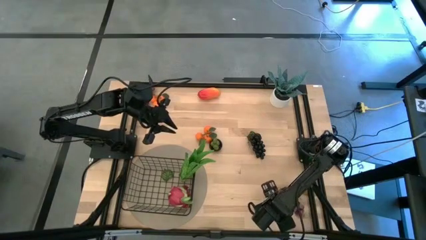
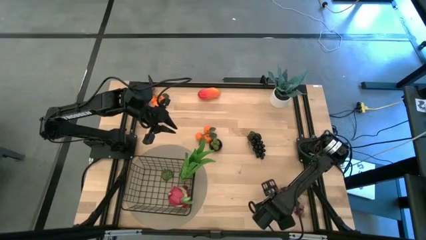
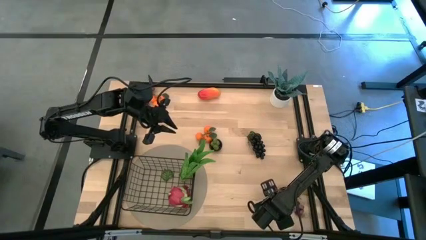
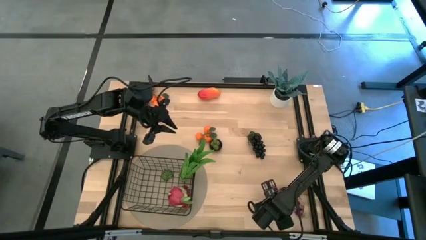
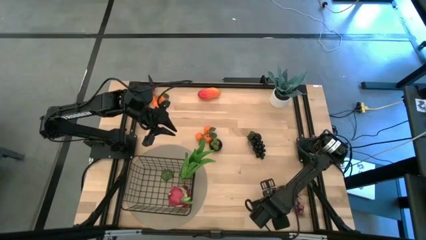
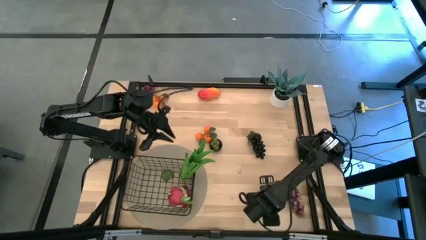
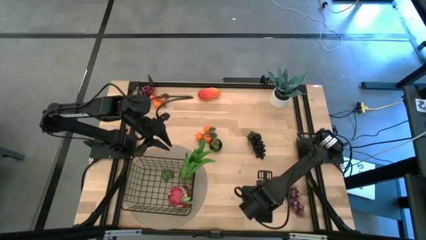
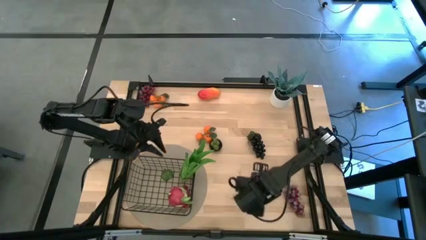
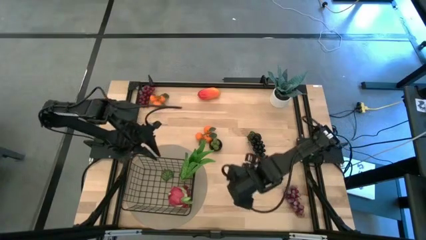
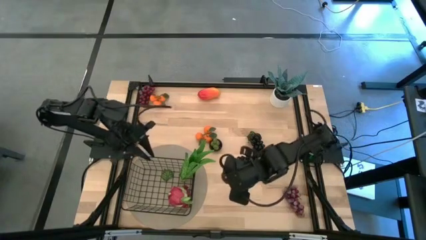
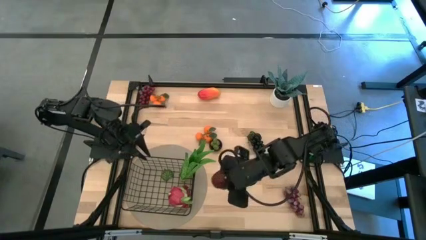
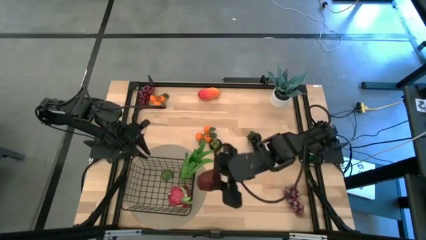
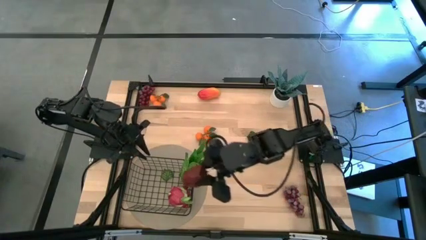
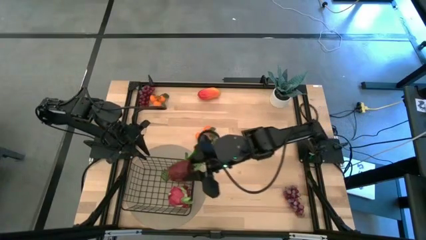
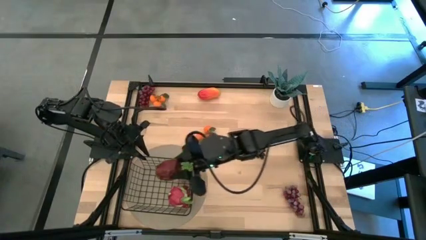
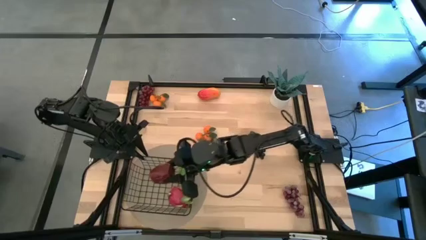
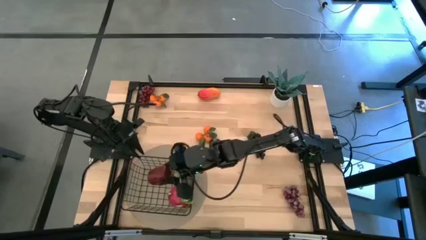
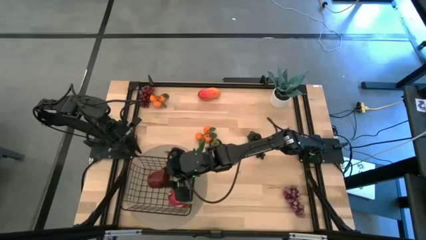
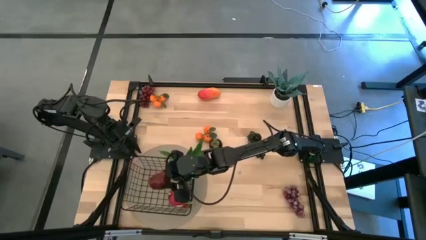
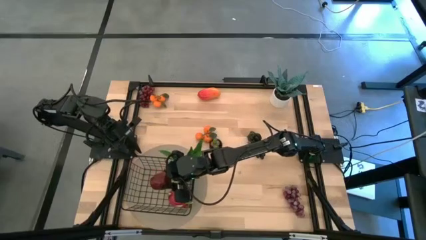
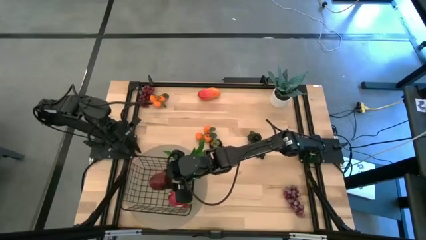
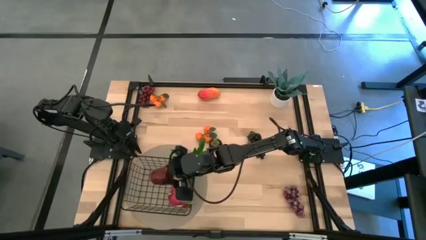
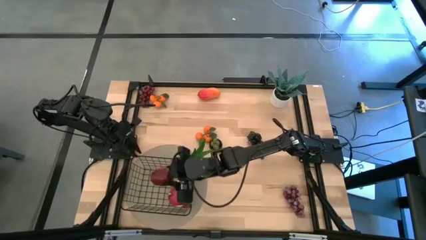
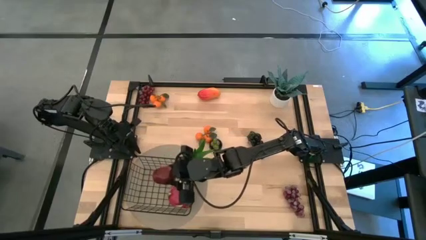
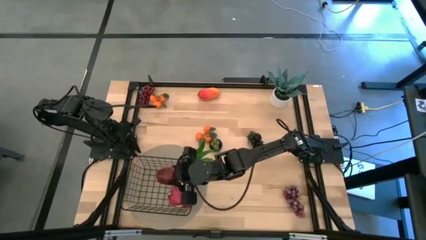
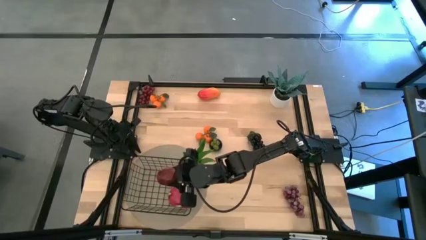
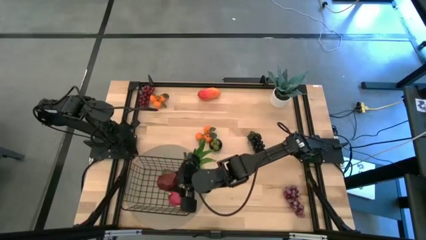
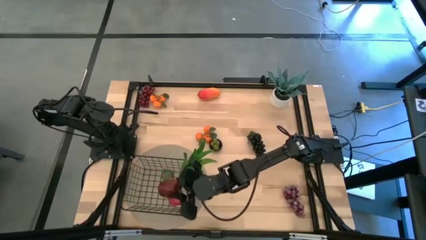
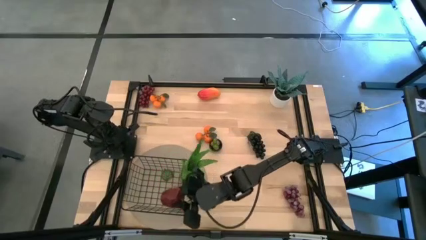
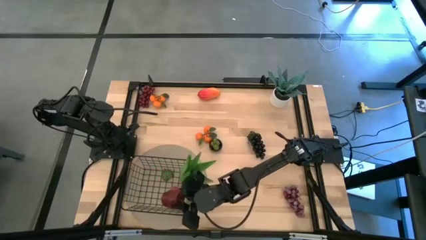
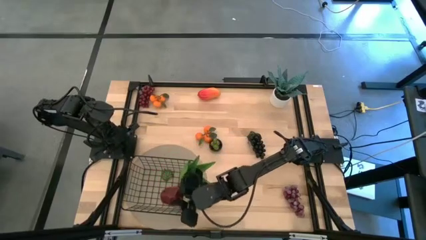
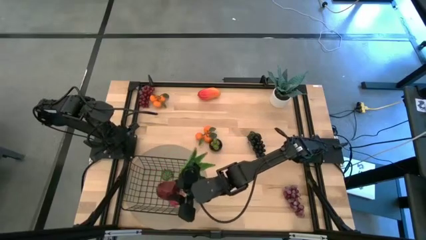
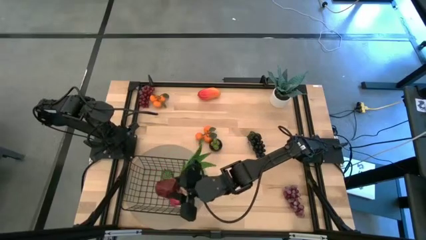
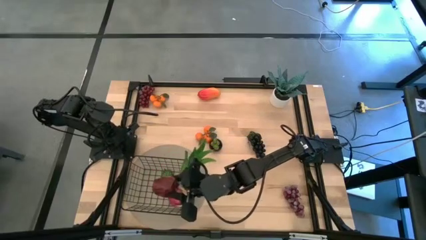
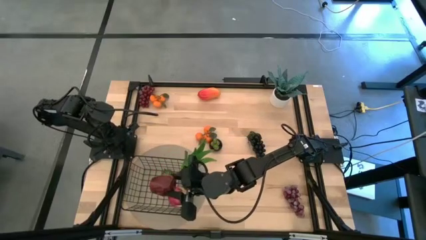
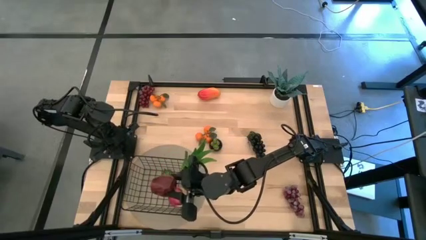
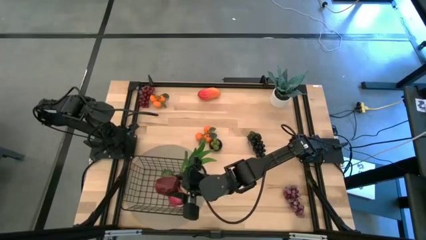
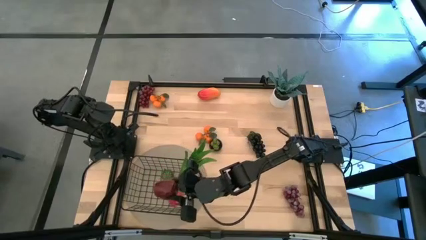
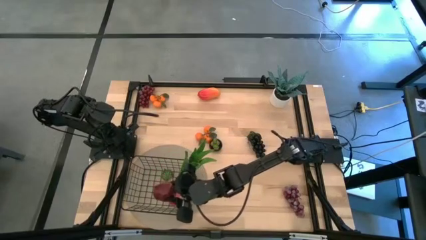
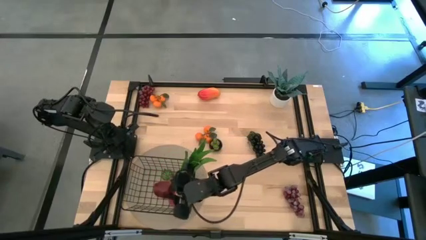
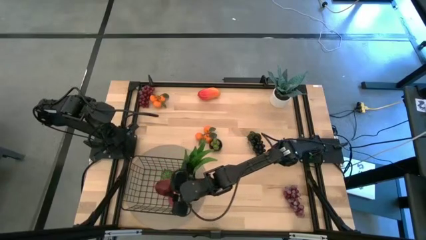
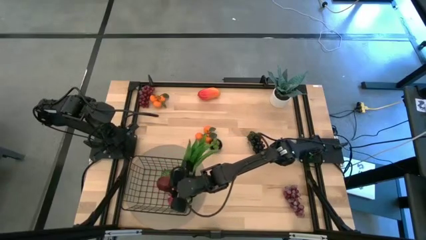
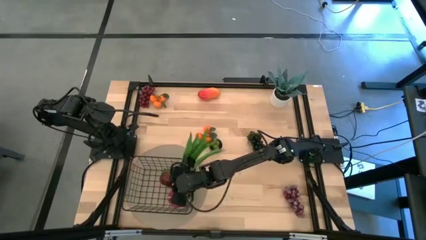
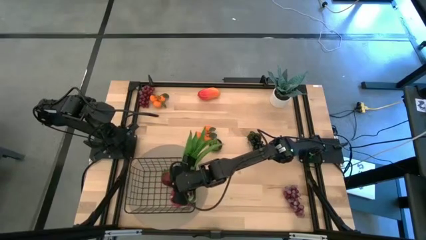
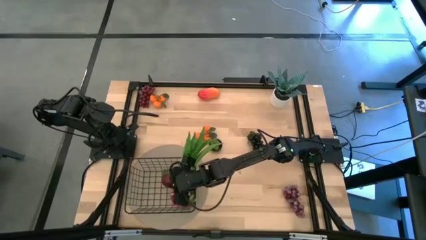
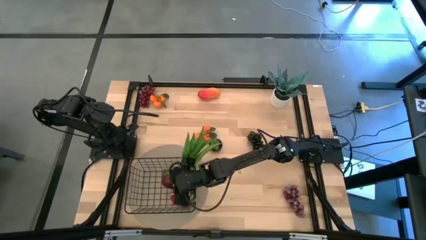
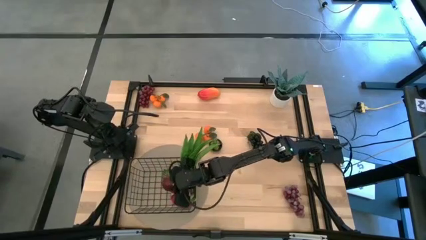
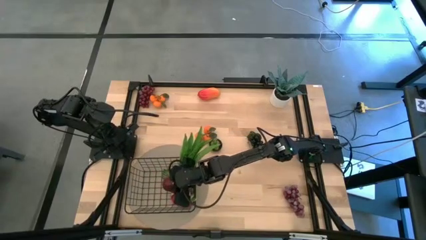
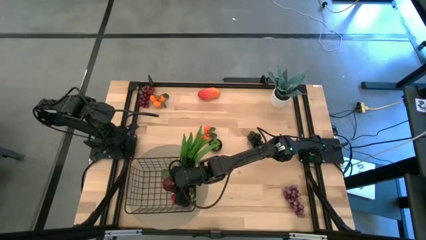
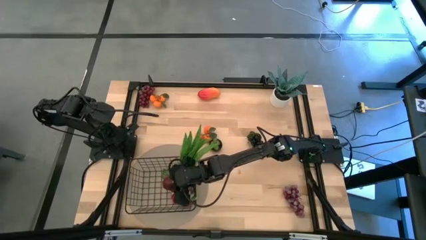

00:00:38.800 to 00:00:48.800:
Task: Build produce basket
Put the red apple into the black wire basket

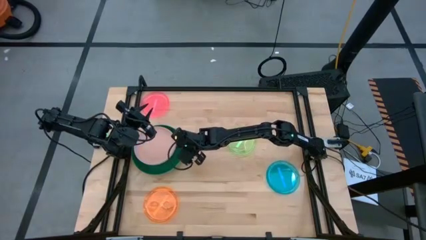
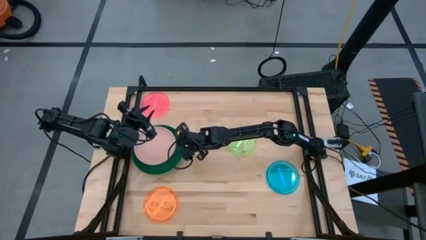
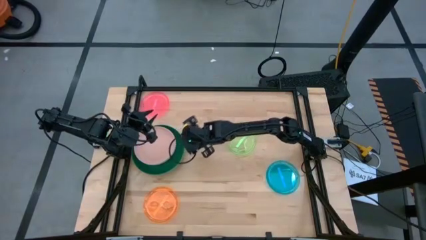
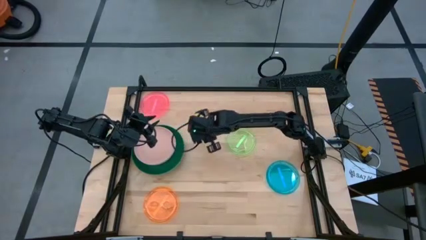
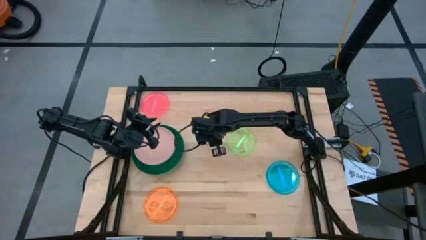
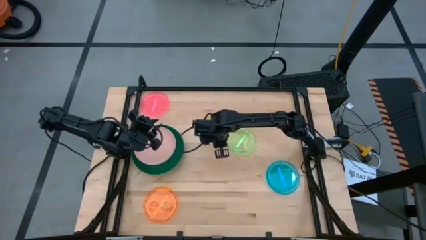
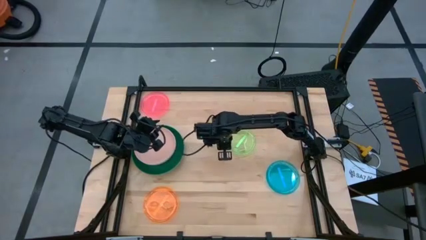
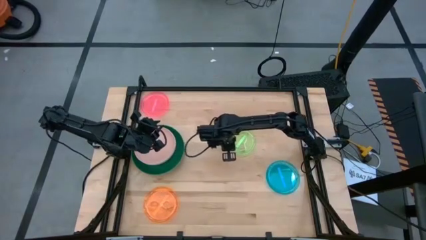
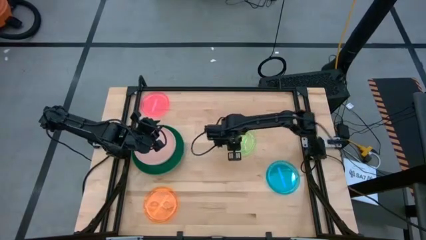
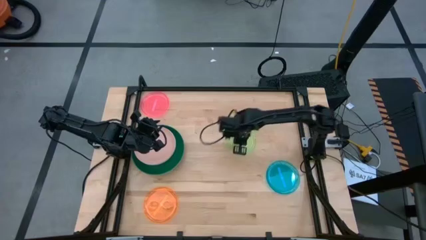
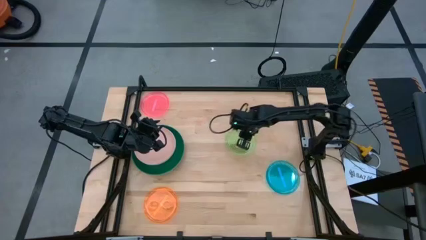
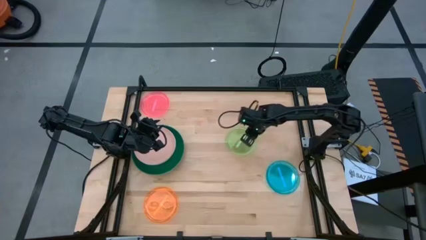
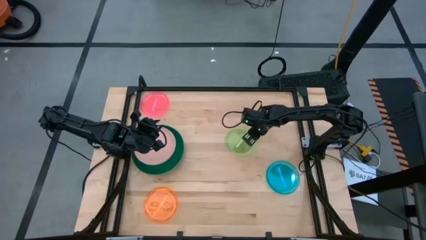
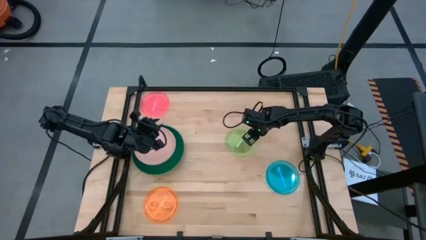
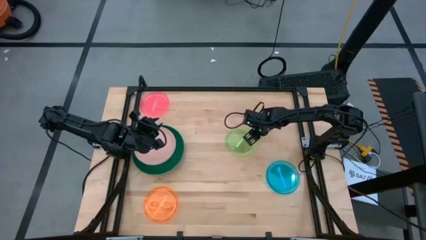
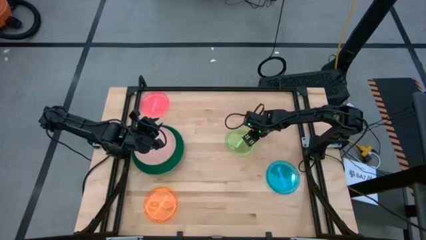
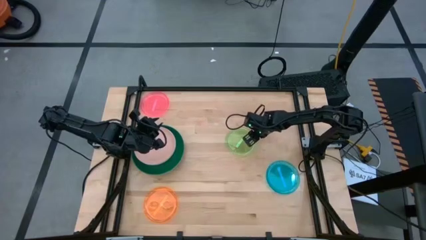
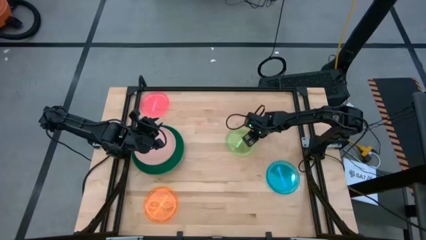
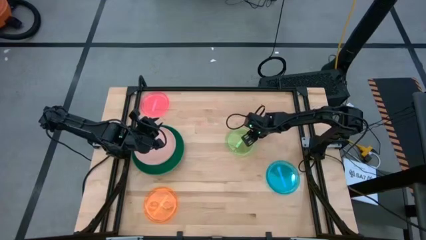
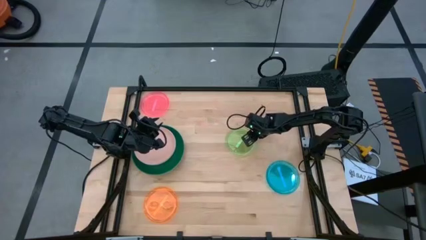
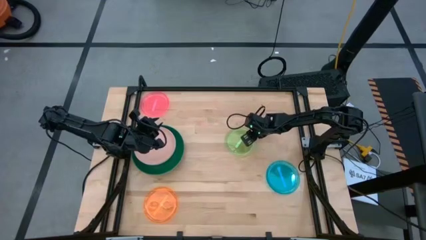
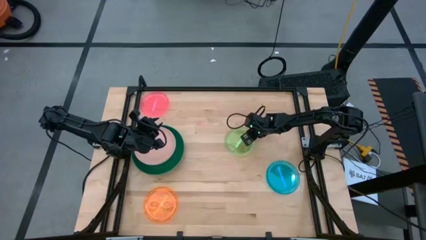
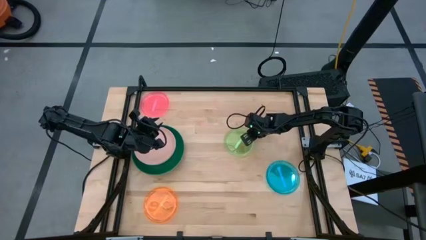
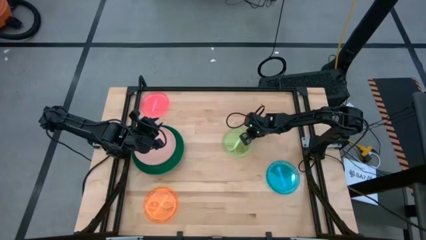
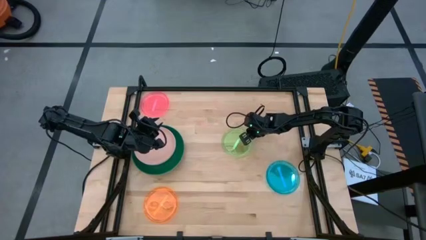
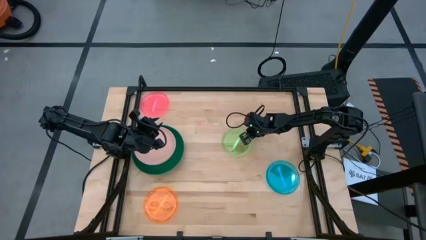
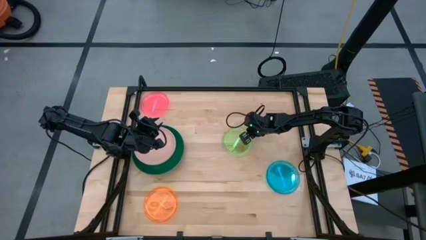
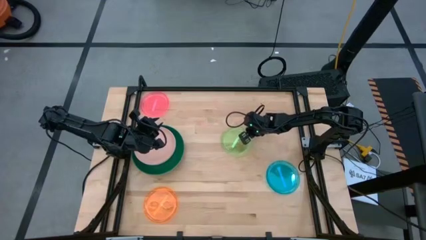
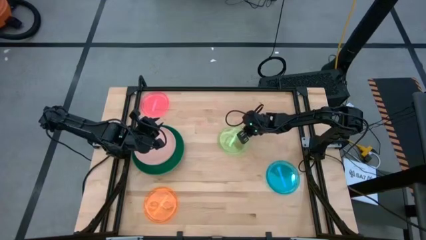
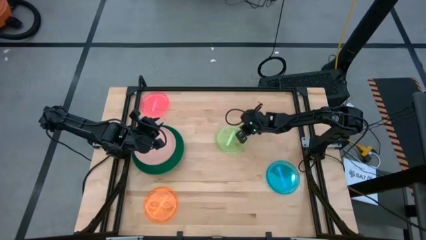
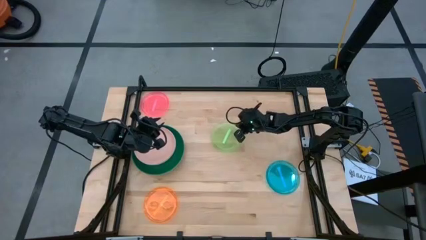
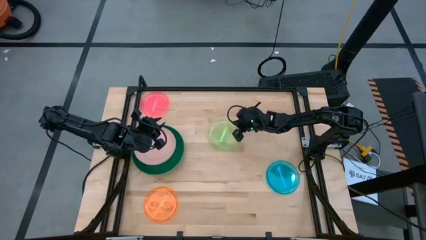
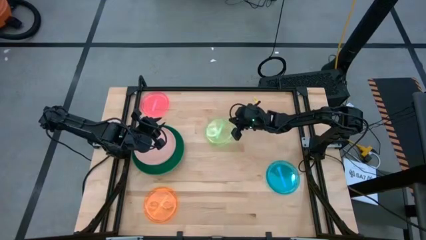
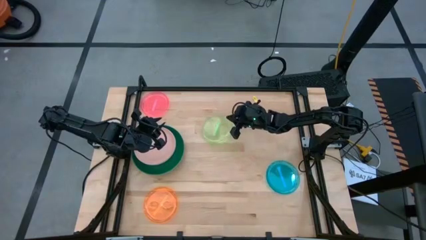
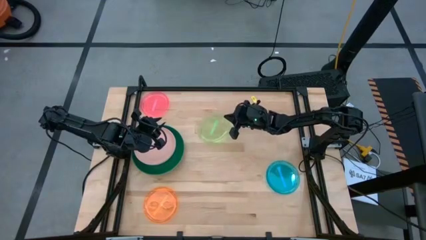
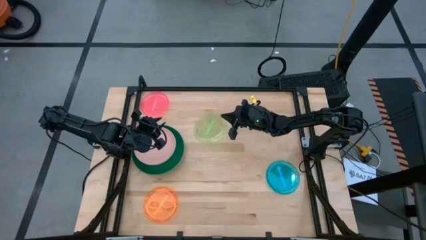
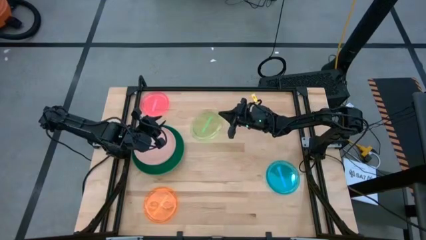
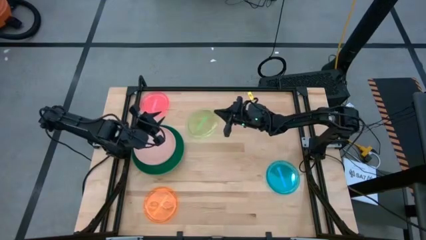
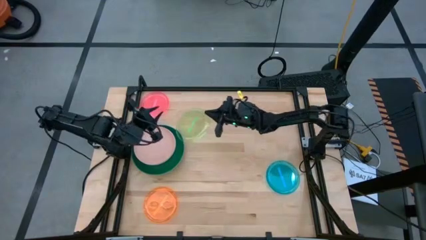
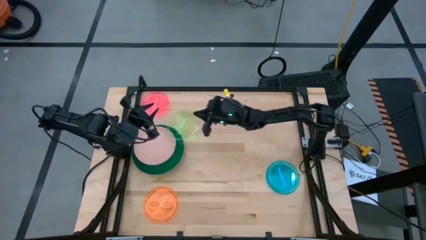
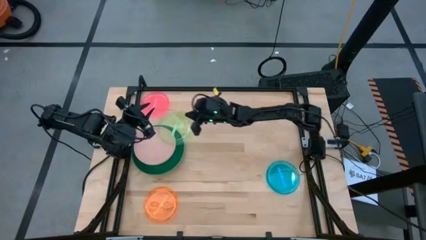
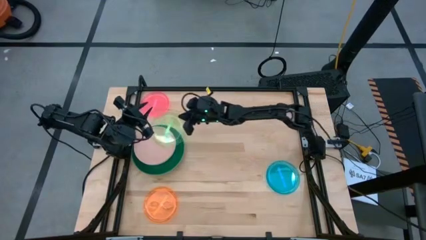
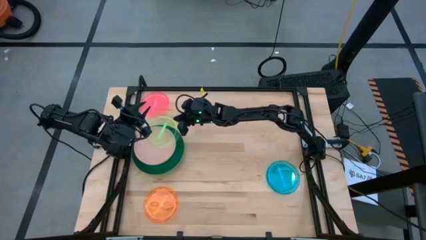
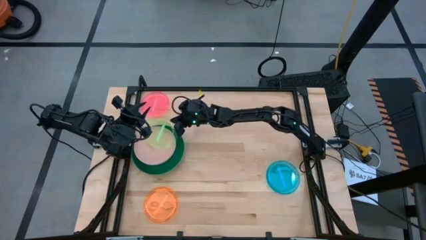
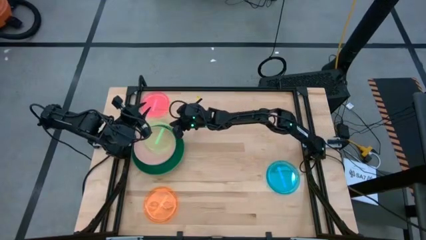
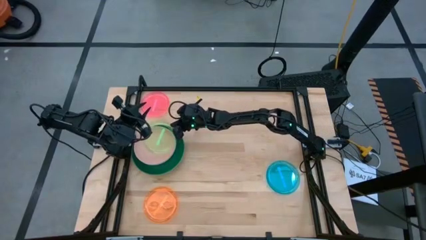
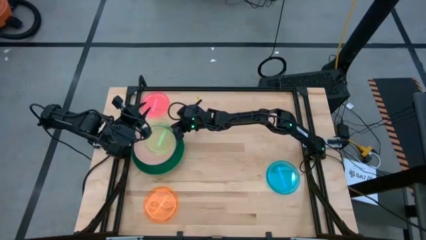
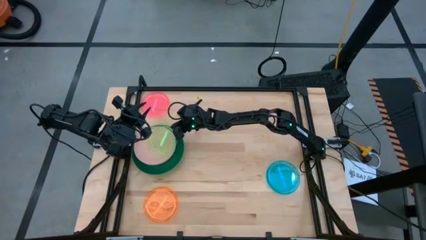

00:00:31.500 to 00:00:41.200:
Task: Stack plastic plates
Stack the green plate on top of the light pink
